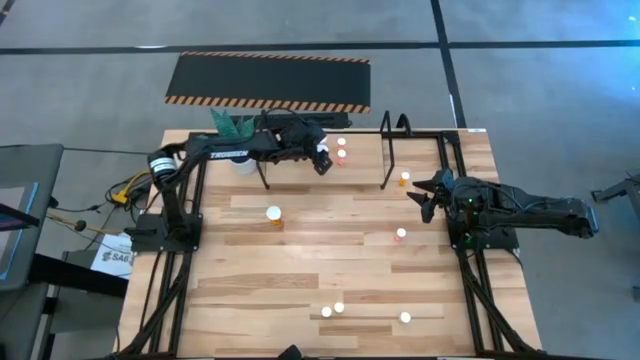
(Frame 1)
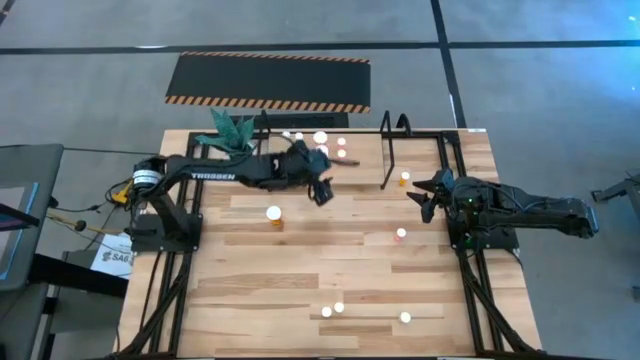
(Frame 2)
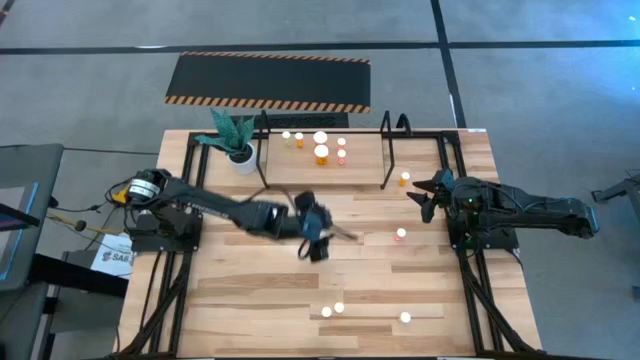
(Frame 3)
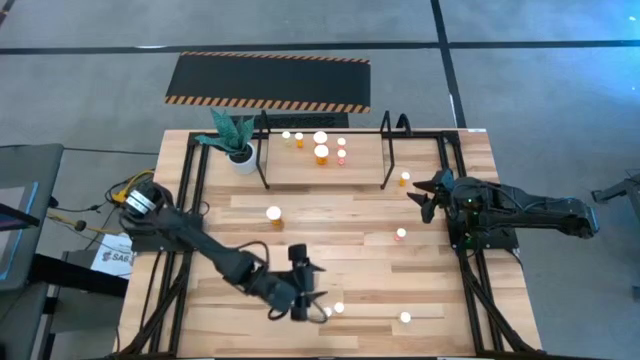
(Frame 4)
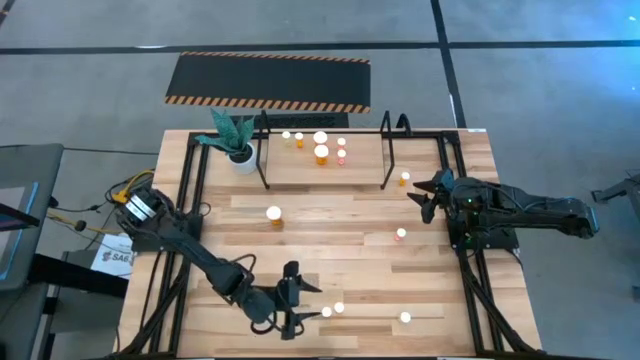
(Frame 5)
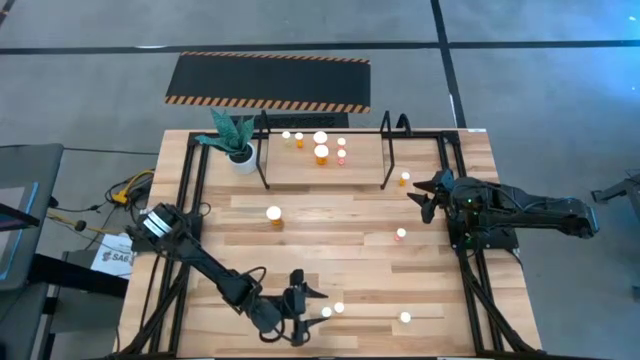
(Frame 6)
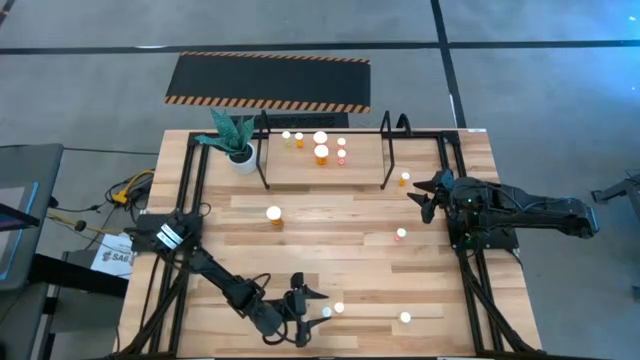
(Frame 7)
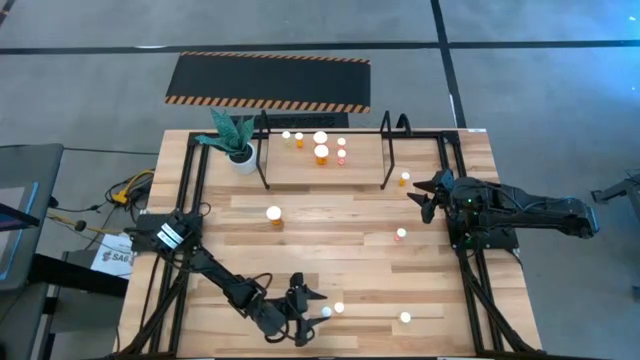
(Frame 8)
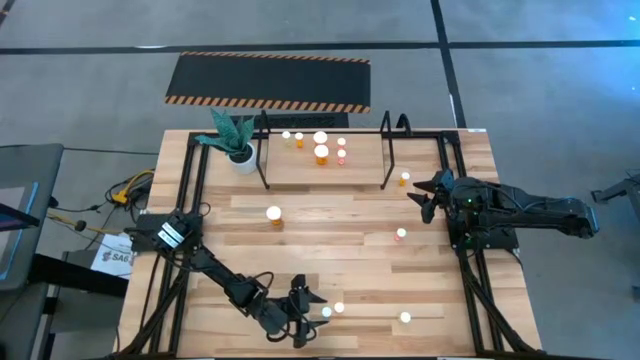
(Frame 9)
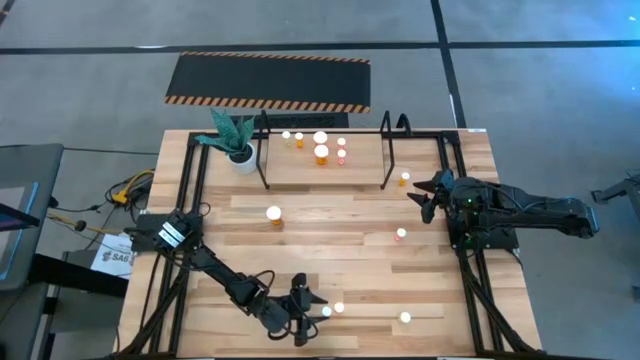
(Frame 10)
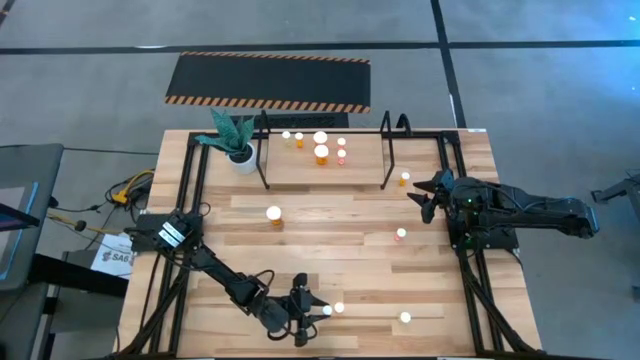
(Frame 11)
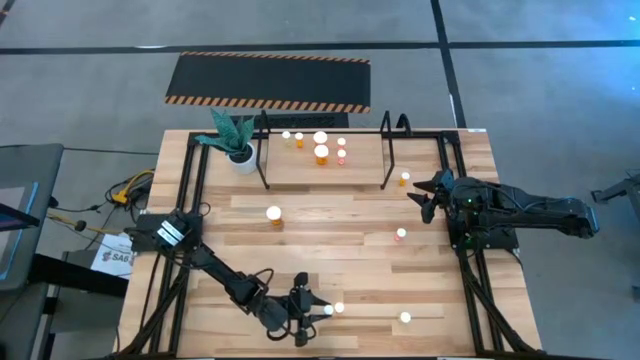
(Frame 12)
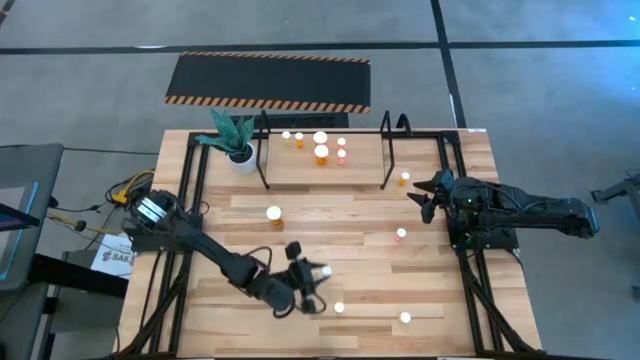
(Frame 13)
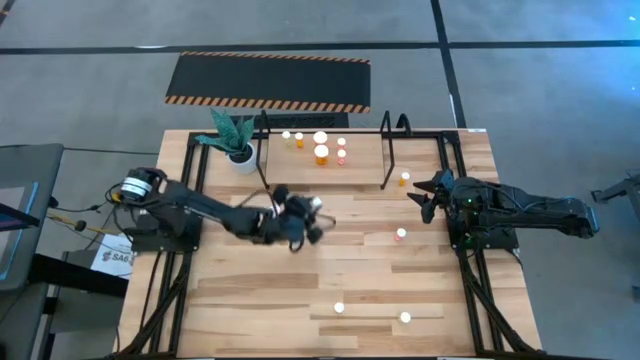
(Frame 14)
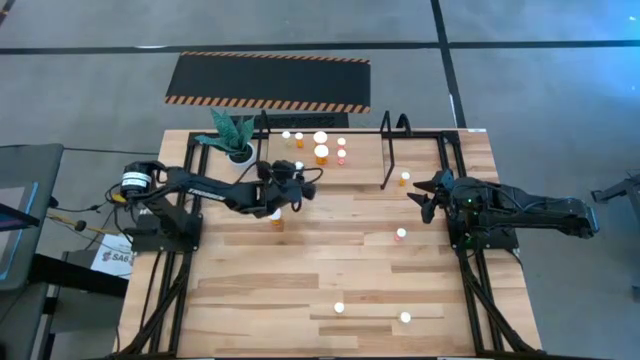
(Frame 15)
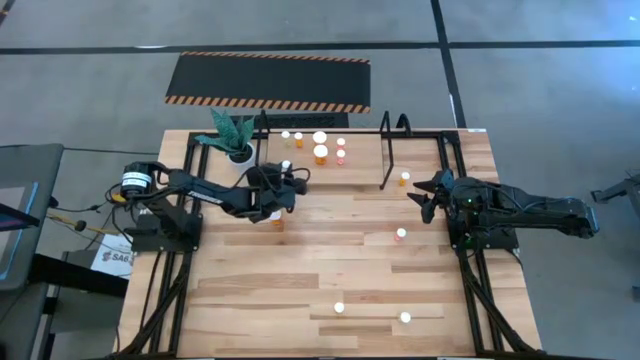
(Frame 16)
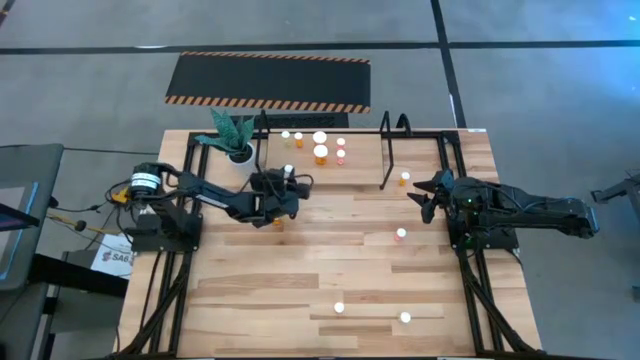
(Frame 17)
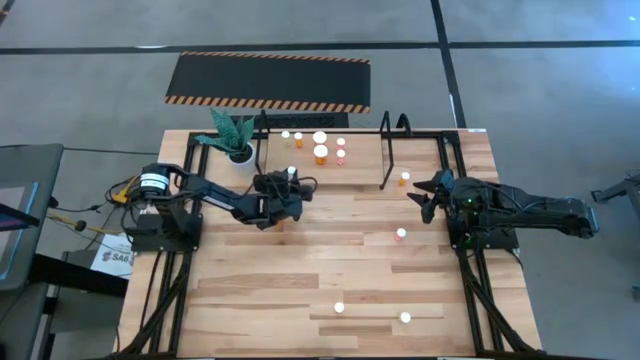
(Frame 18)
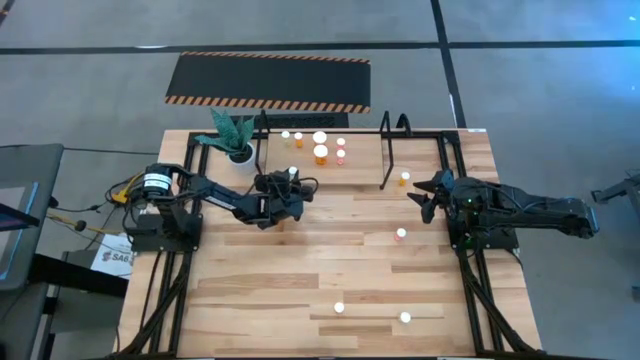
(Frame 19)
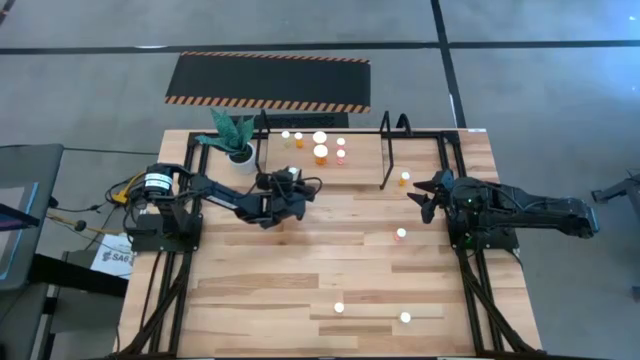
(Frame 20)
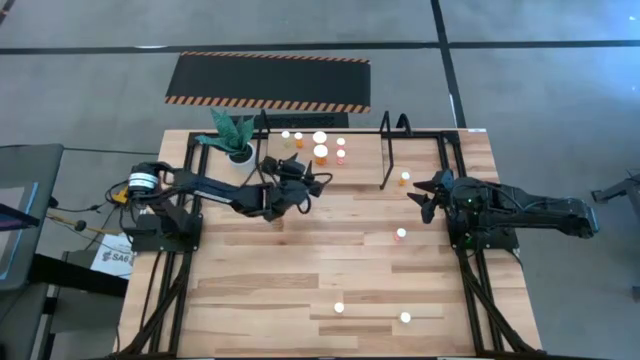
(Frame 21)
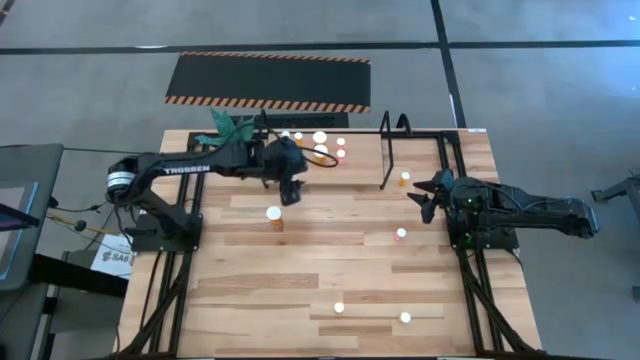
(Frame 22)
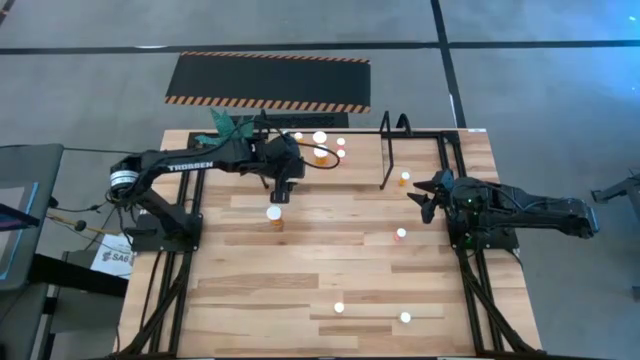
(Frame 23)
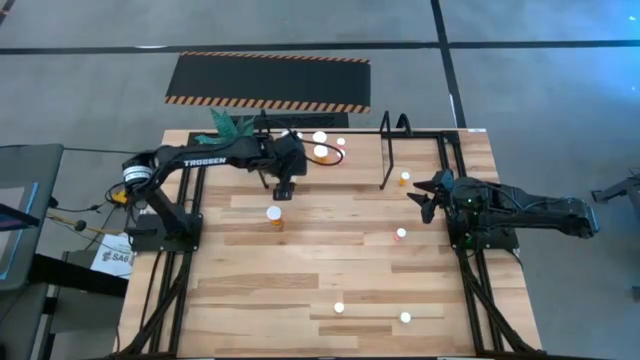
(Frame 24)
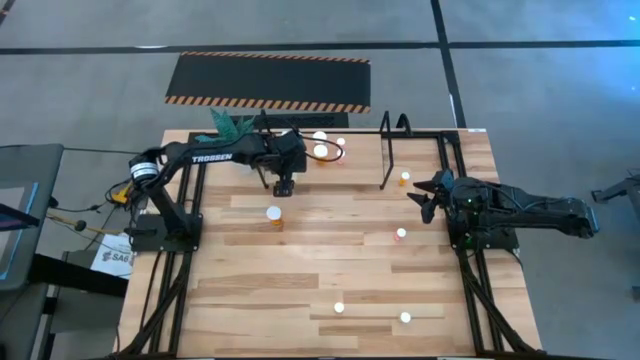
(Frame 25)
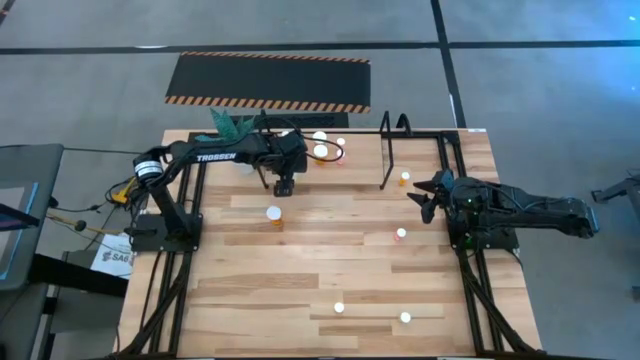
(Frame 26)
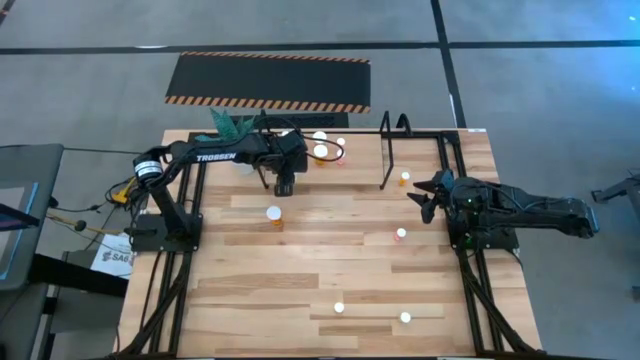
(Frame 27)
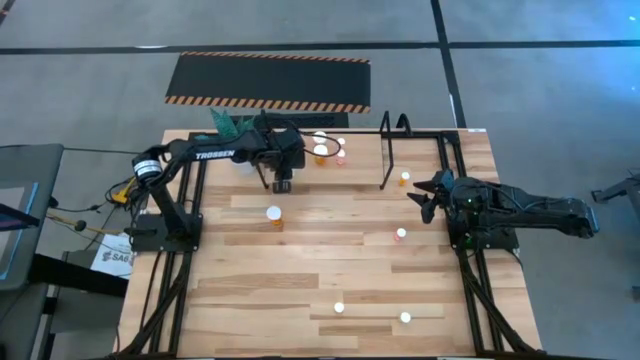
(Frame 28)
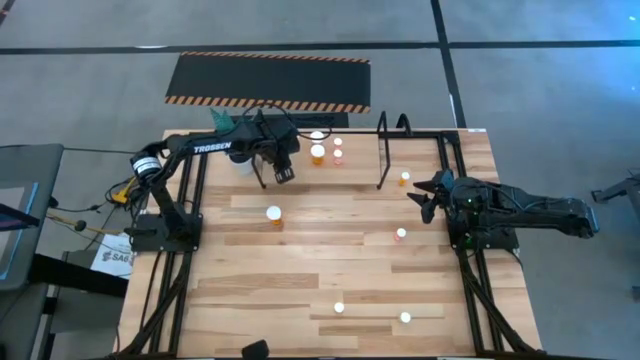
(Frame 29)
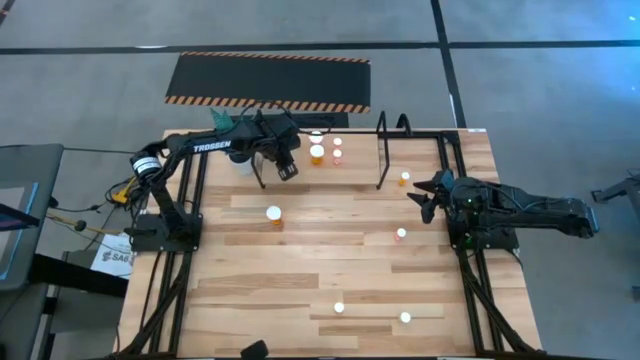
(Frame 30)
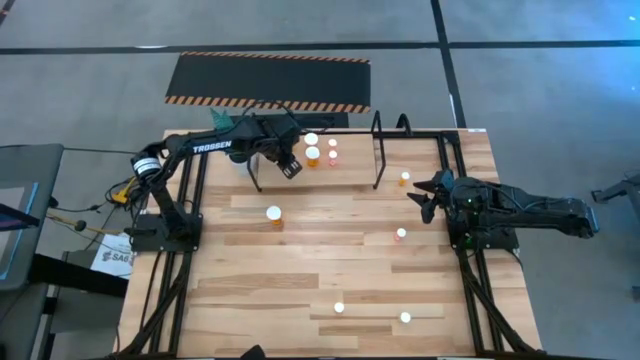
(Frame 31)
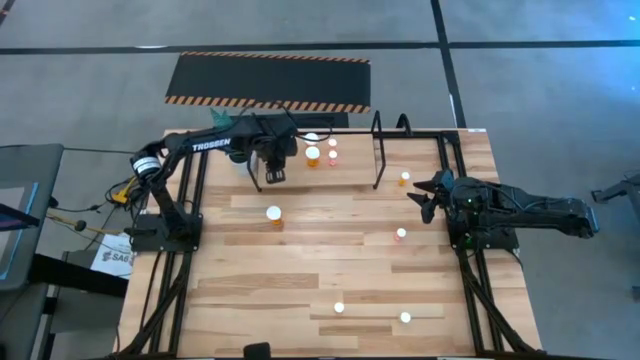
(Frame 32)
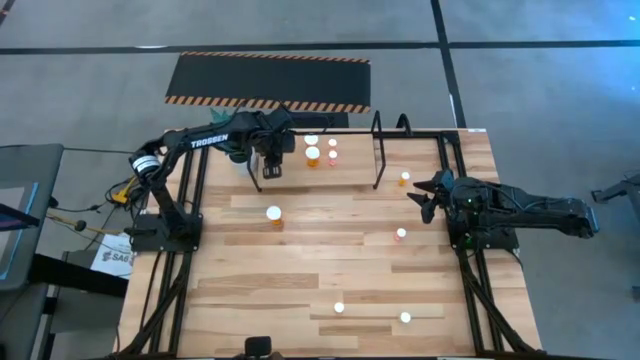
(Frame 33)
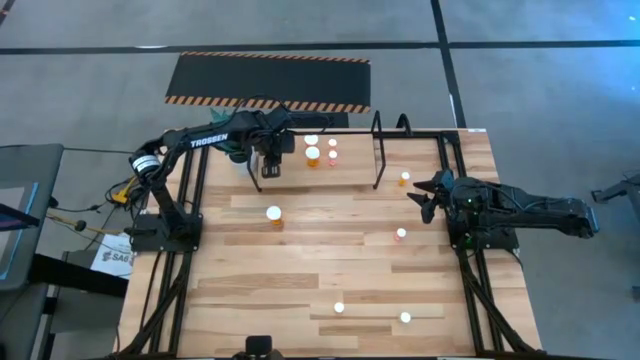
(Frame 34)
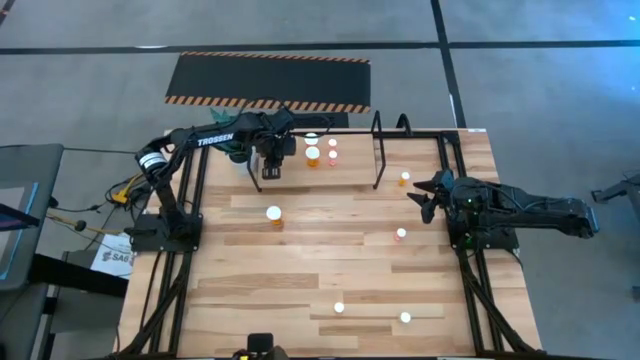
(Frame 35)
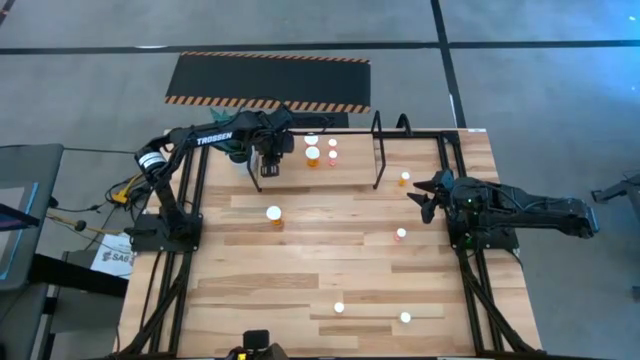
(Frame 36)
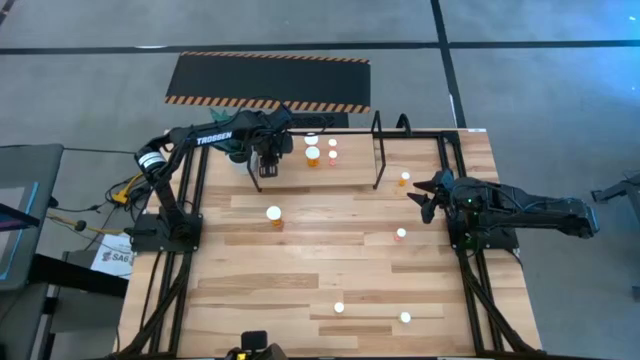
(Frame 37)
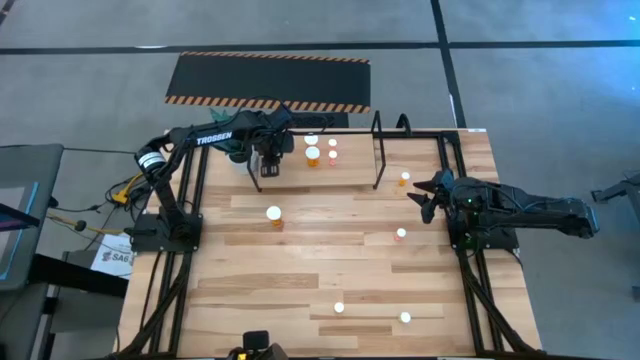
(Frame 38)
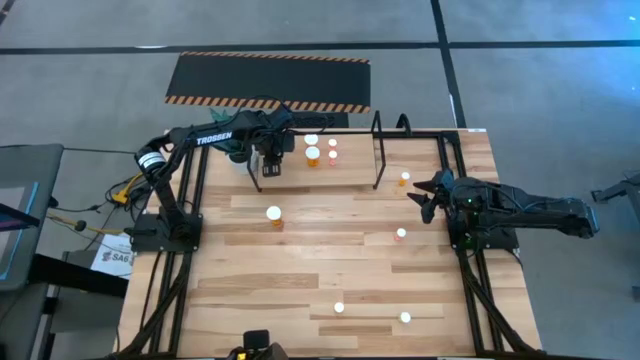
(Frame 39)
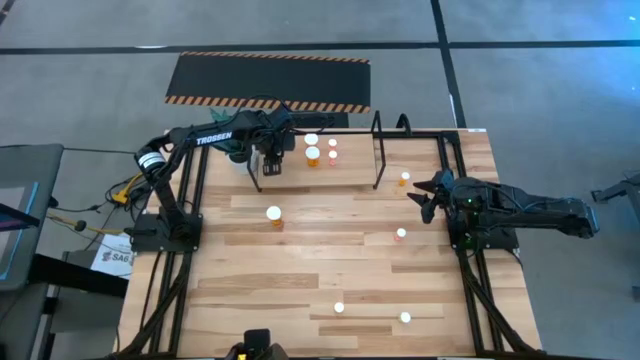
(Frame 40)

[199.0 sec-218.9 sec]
Task: Pick and place medicine bottles onto shelf by color
Put the left yellow pill bottle on the shelf aligned with the other yellow pill bottle
